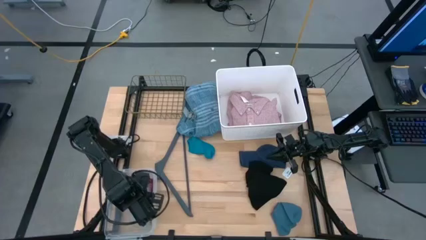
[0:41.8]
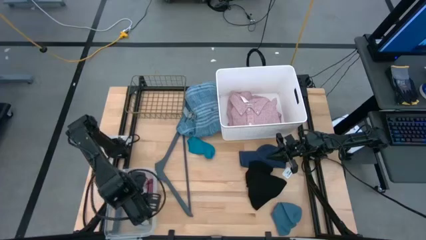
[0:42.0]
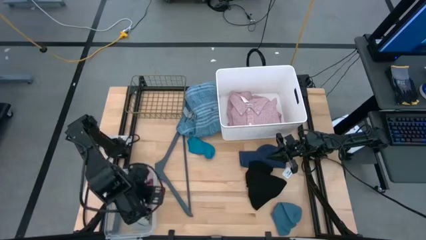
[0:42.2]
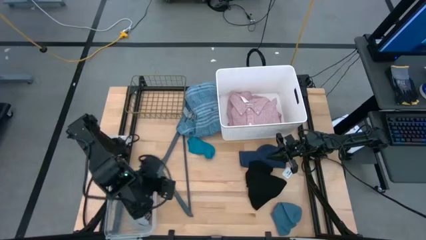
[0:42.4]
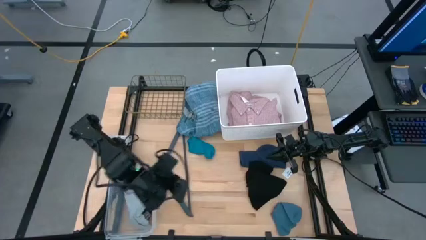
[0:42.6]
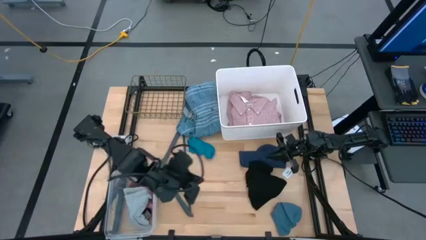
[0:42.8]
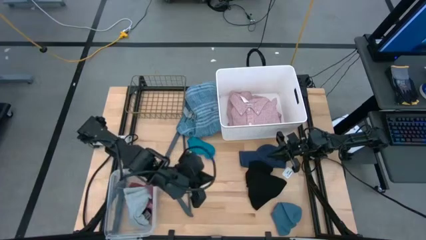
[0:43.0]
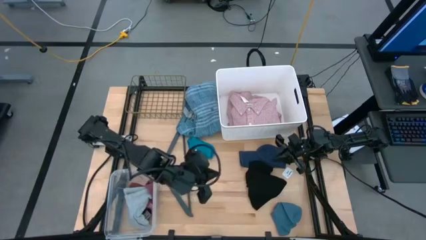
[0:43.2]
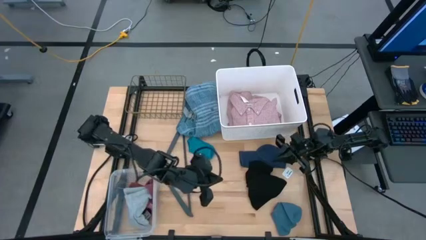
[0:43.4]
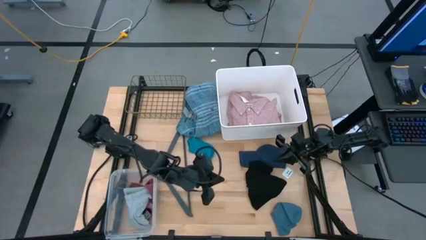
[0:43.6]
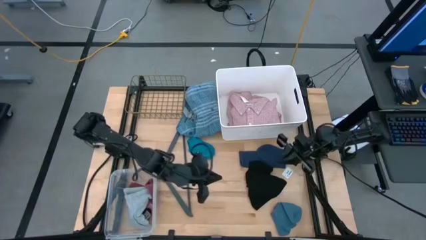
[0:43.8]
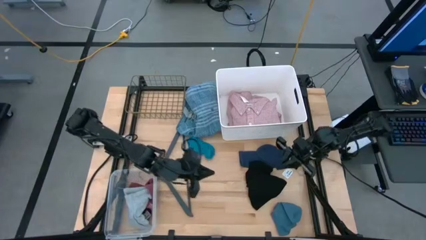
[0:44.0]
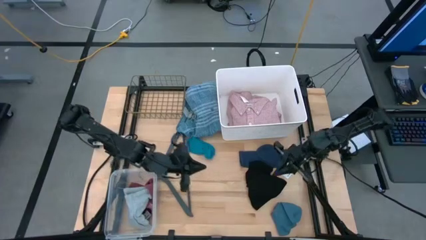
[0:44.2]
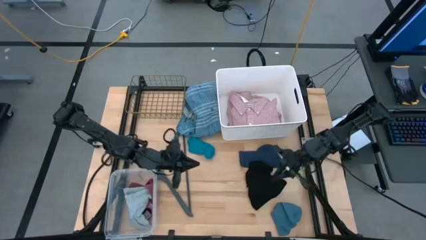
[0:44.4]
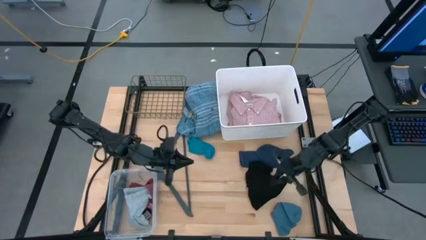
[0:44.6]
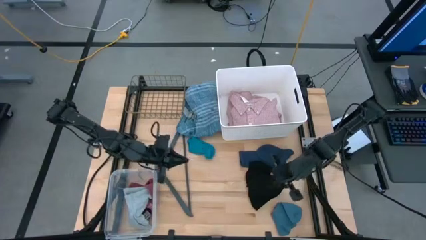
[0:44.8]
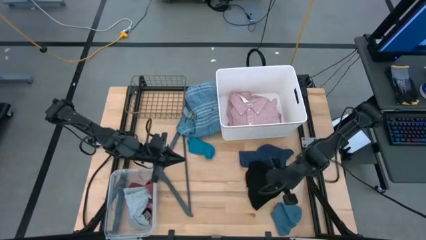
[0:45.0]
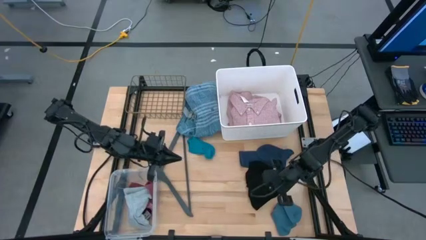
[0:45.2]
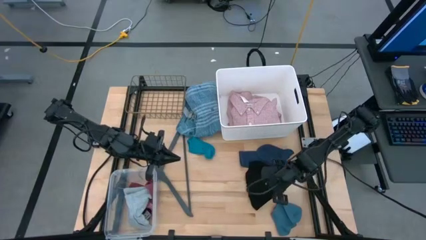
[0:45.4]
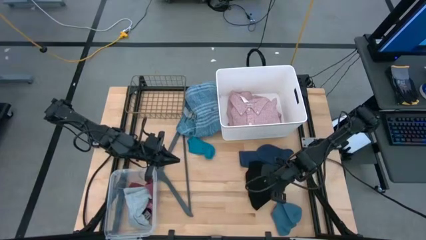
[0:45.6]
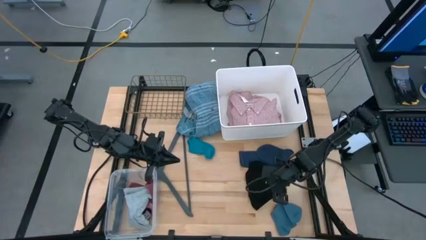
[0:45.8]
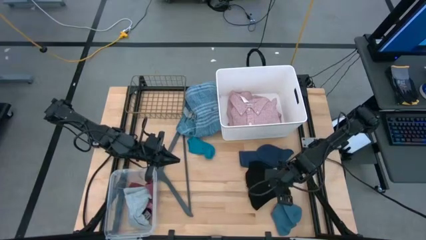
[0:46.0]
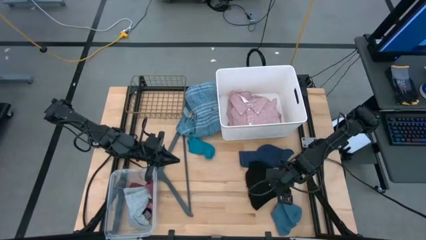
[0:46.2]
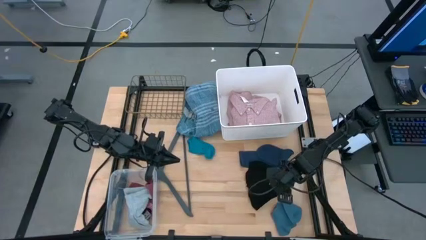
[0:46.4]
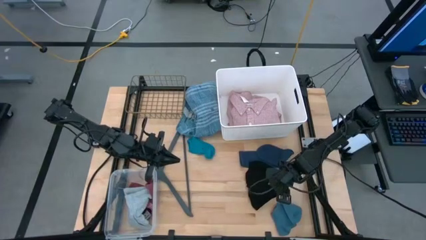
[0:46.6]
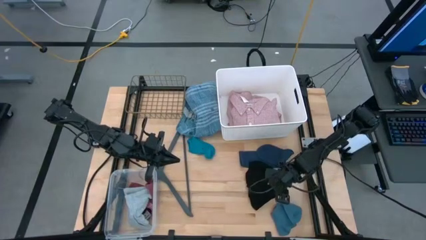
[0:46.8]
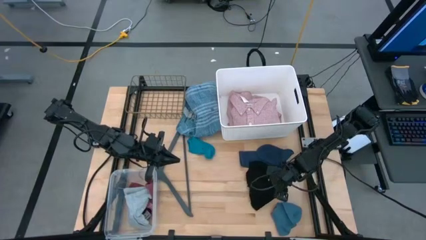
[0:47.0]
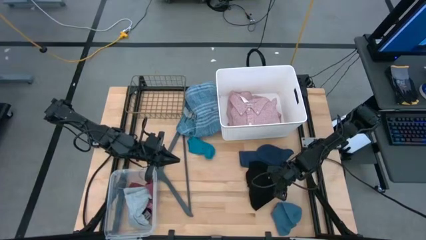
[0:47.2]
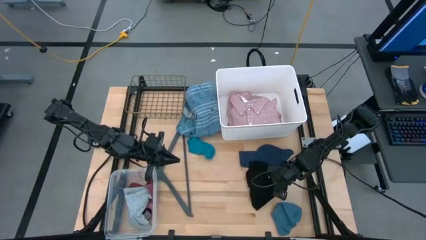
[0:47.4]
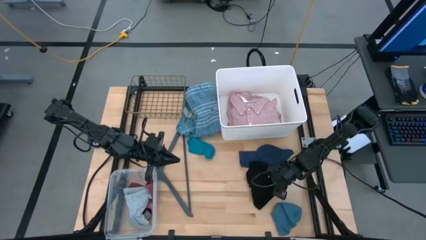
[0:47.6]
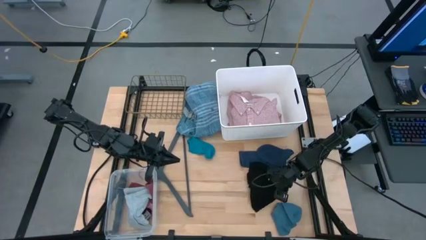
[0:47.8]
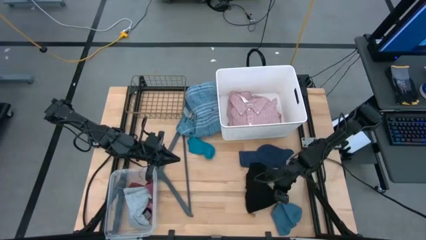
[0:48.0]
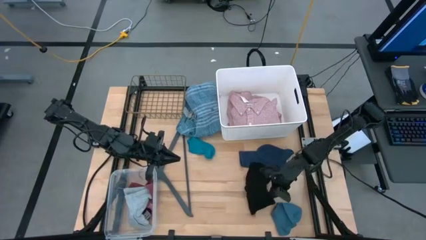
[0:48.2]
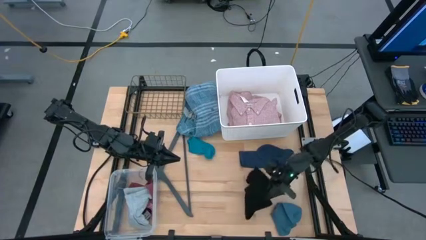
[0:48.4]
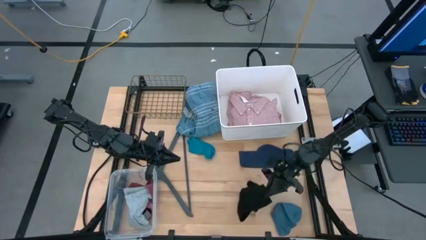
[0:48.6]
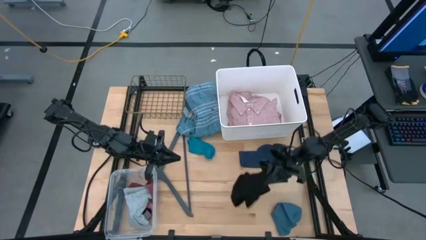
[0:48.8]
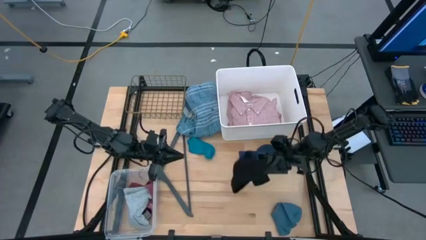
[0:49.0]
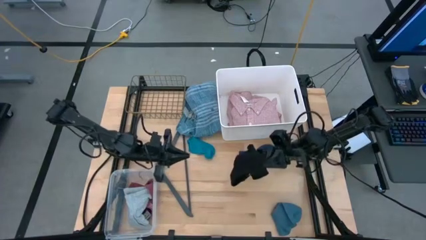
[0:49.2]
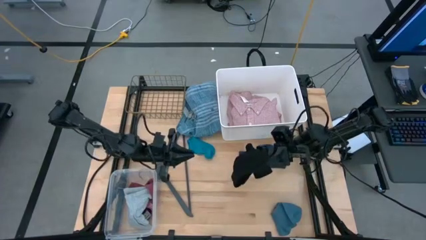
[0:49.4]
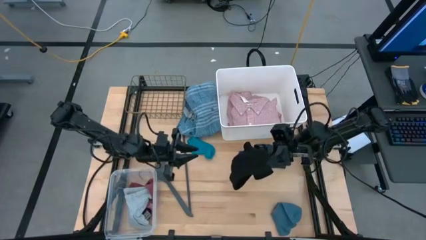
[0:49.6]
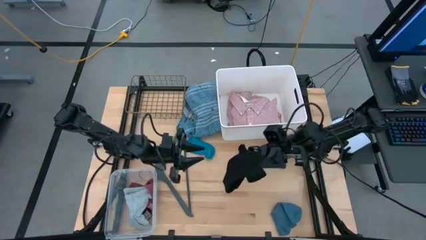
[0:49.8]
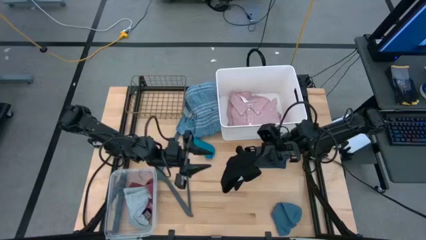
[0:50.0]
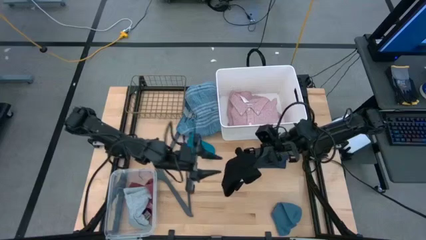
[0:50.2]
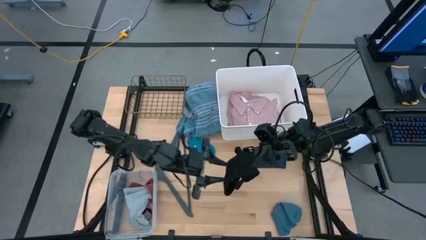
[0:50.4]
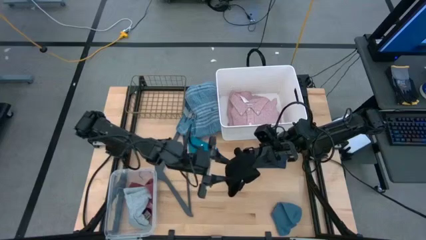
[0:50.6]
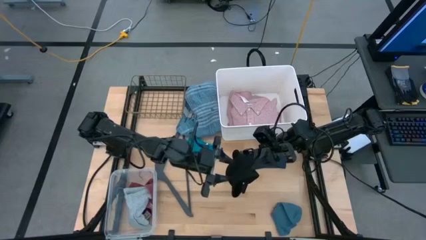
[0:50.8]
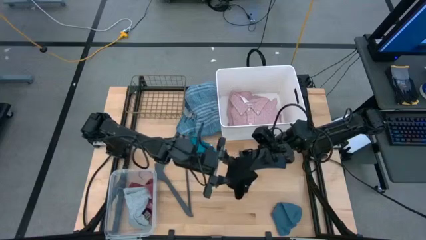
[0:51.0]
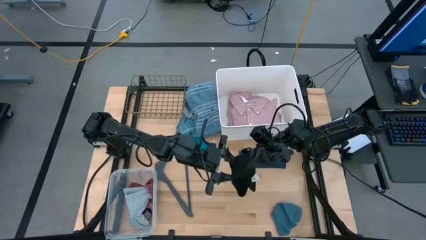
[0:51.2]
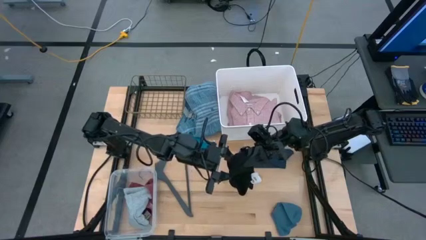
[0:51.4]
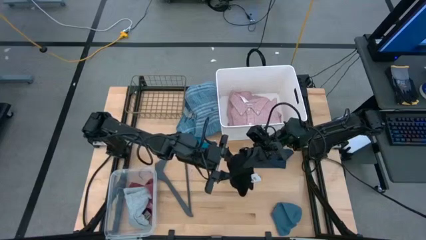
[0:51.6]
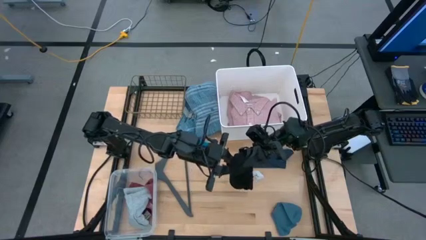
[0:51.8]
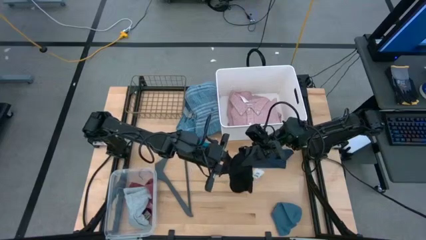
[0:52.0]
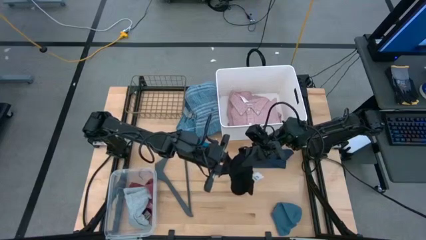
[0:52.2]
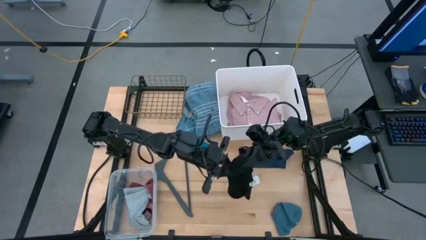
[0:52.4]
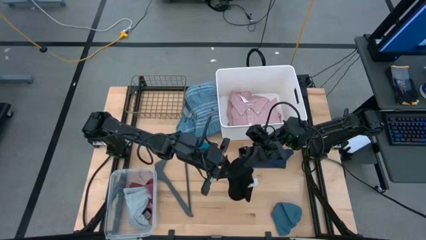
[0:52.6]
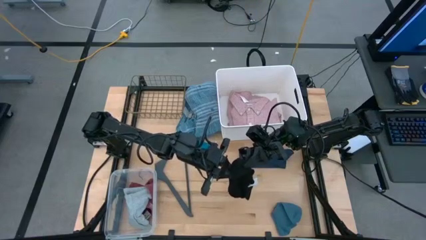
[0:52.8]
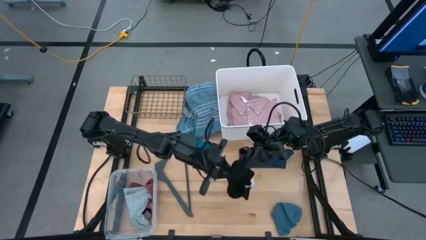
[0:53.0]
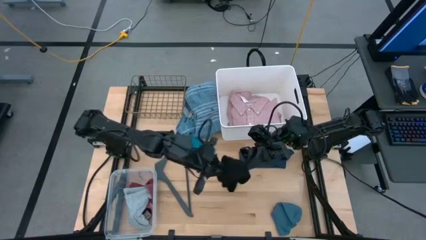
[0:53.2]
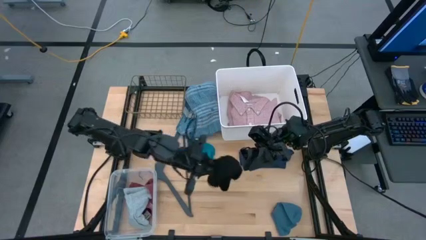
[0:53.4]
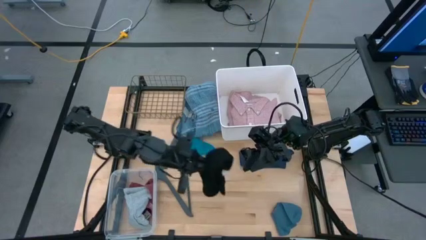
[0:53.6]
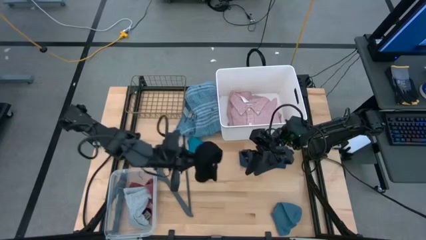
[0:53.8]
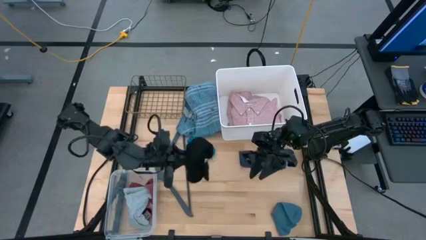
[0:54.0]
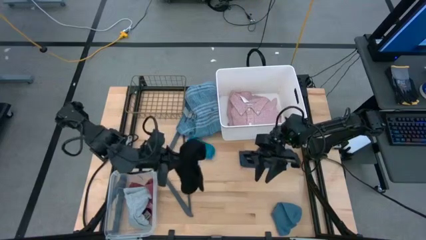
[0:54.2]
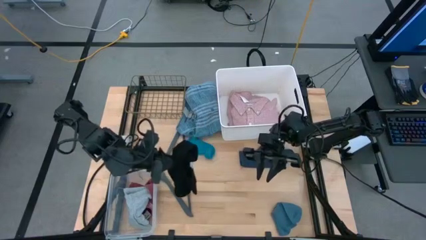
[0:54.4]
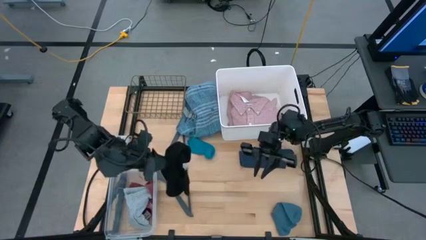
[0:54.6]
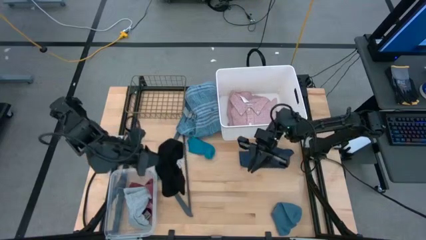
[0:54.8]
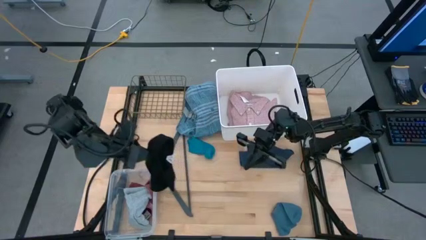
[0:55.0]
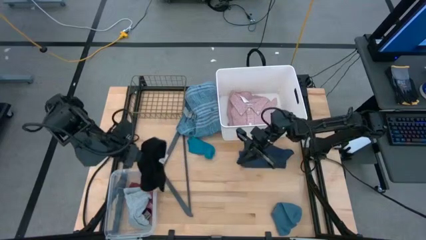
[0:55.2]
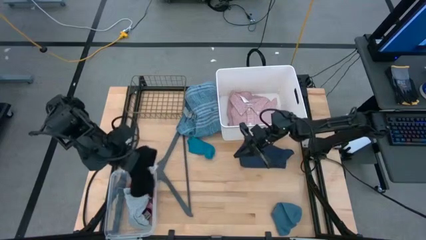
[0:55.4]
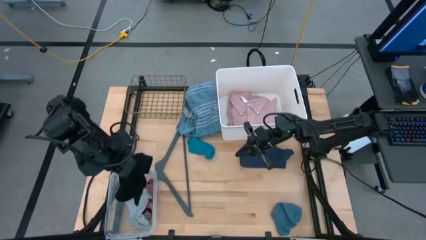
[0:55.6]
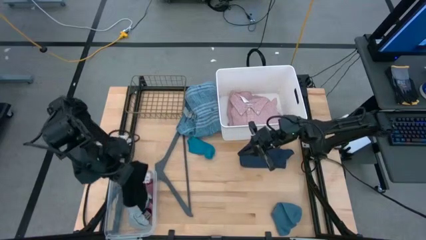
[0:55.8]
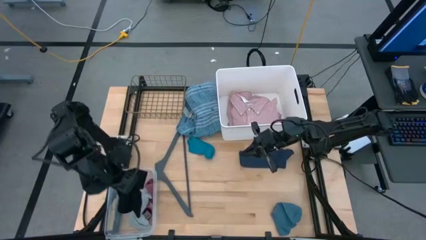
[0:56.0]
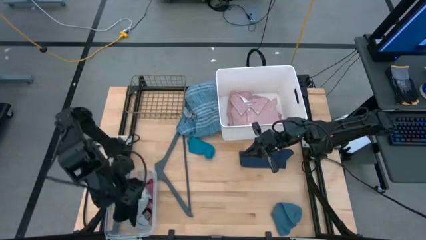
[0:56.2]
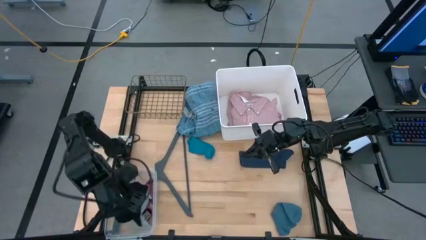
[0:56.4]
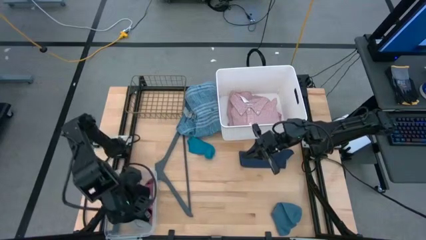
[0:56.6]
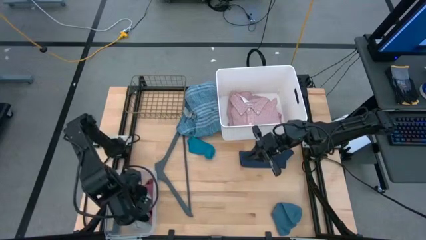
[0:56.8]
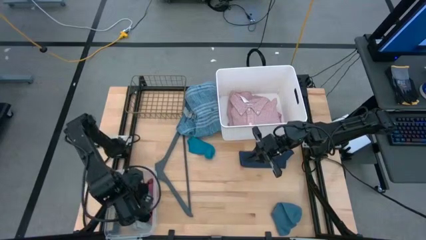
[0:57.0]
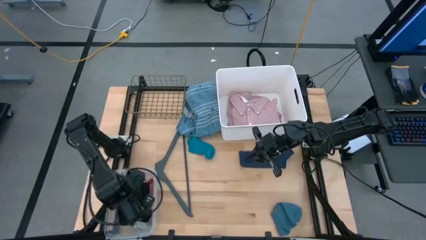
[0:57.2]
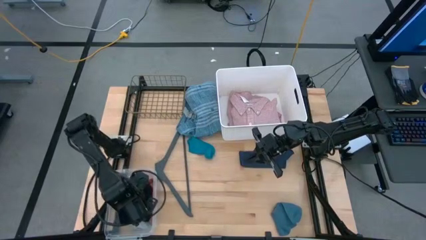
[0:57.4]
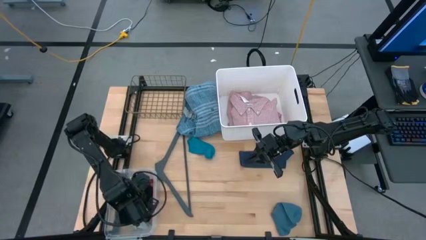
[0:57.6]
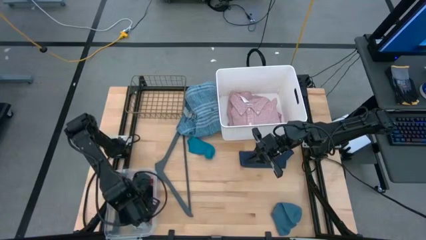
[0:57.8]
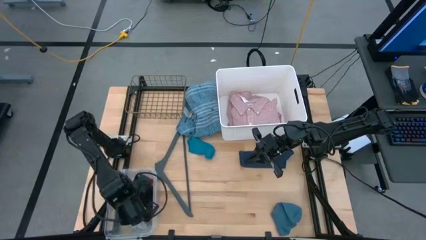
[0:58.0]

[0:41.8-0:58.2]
Task: Pick & Place Cloths
Put the black boxers into the transparent bin
